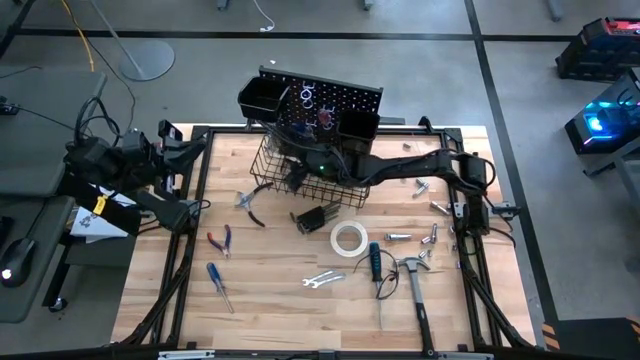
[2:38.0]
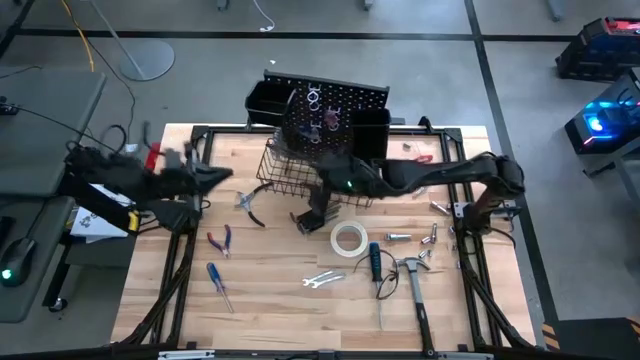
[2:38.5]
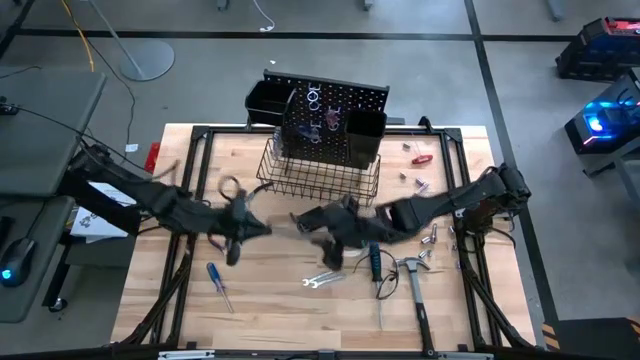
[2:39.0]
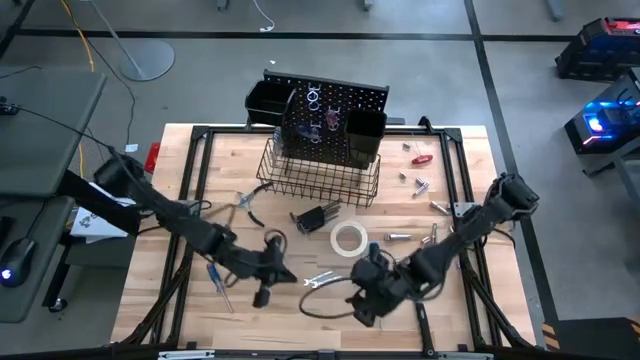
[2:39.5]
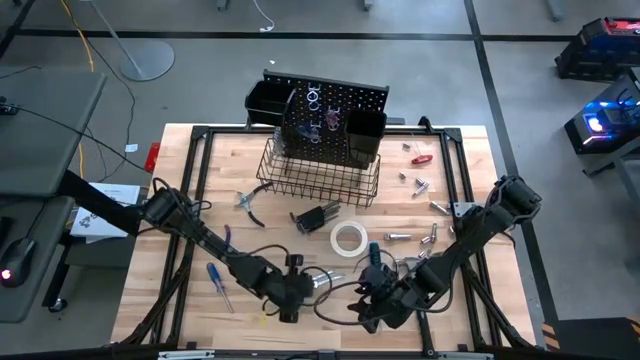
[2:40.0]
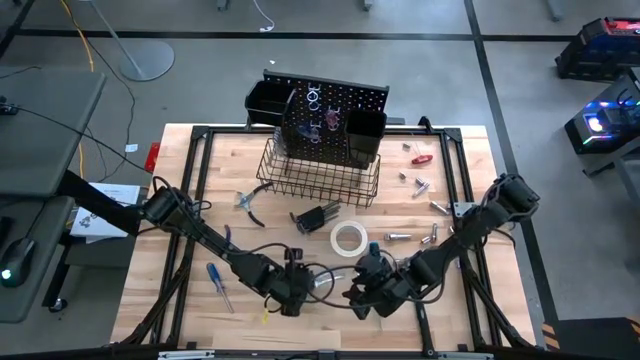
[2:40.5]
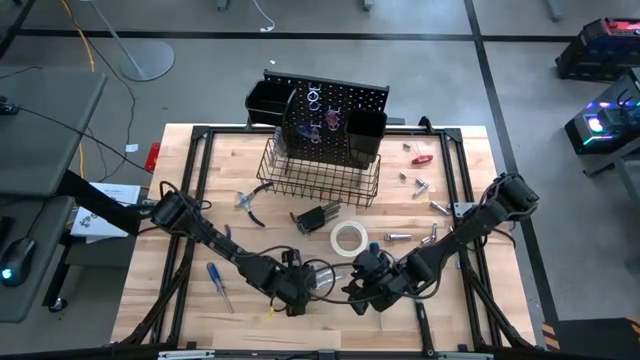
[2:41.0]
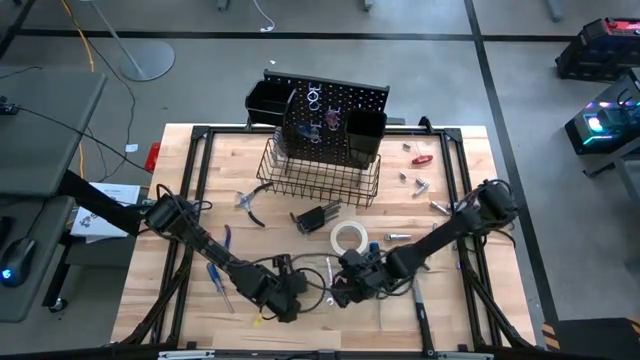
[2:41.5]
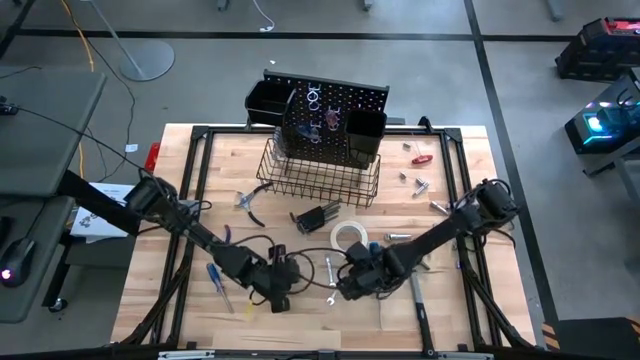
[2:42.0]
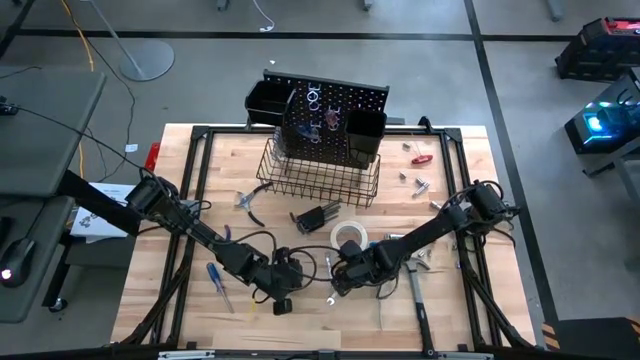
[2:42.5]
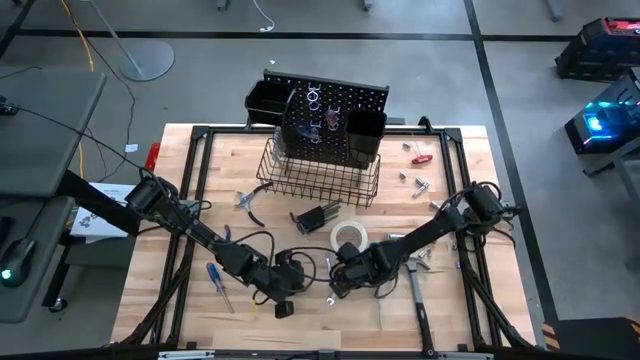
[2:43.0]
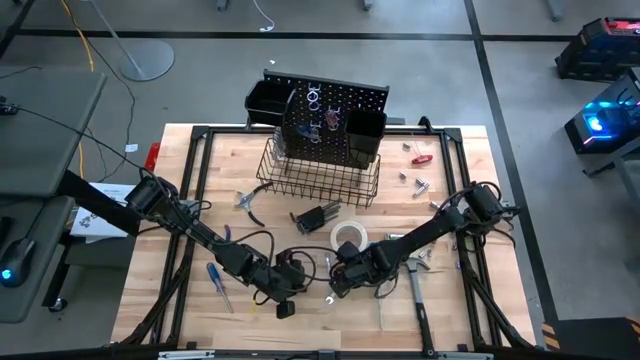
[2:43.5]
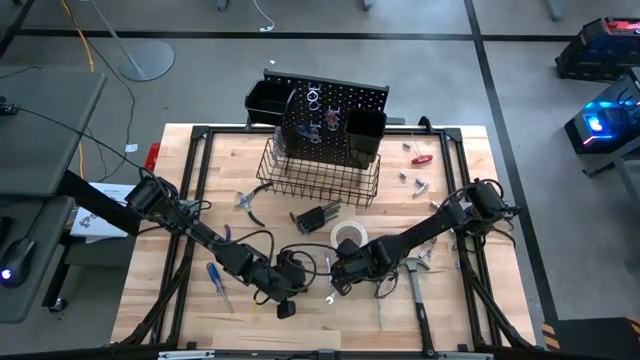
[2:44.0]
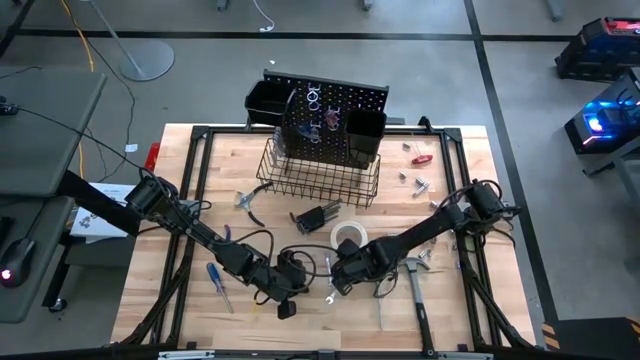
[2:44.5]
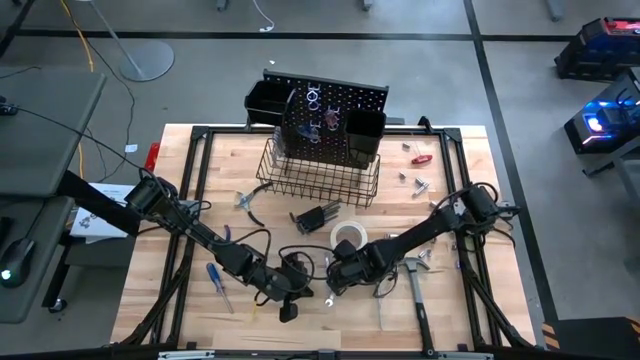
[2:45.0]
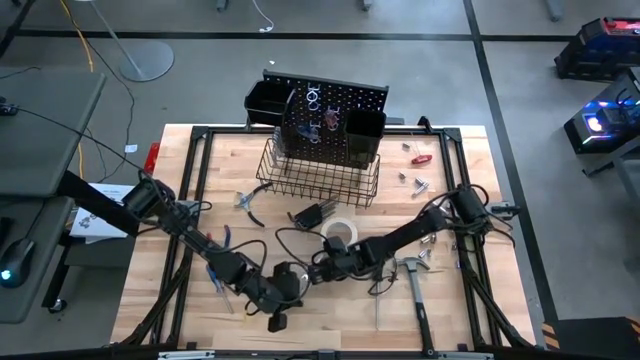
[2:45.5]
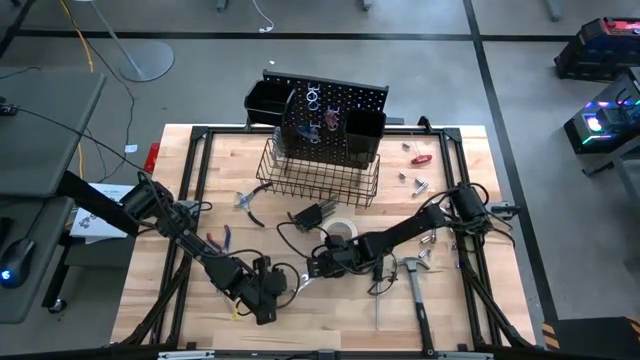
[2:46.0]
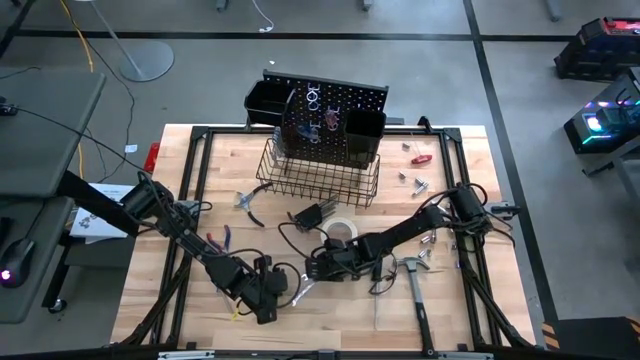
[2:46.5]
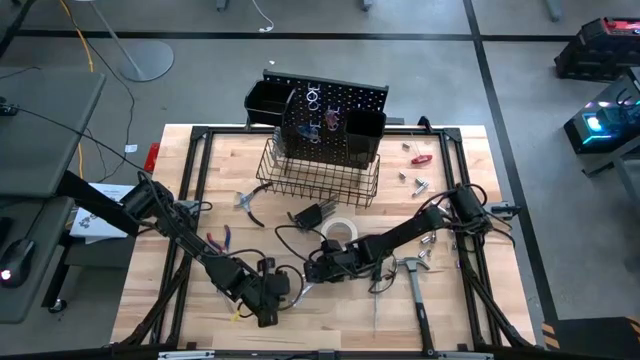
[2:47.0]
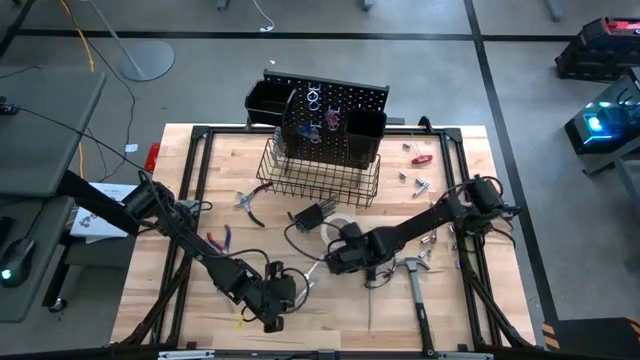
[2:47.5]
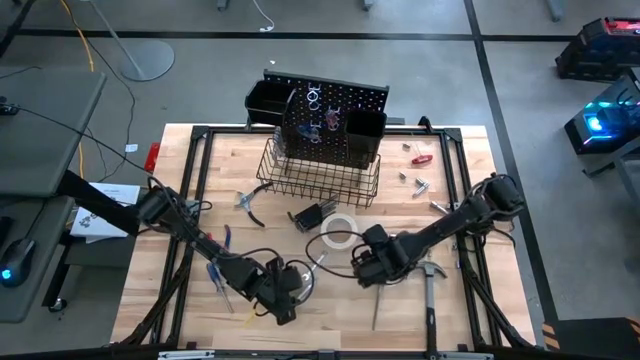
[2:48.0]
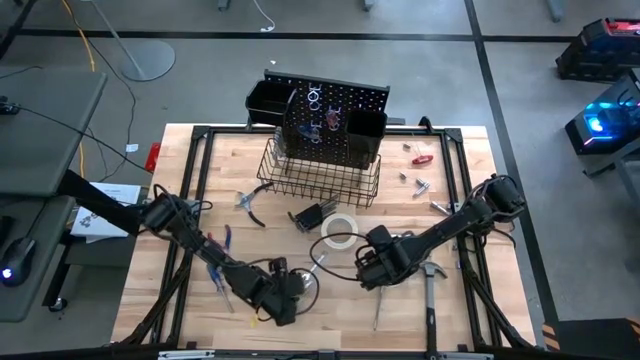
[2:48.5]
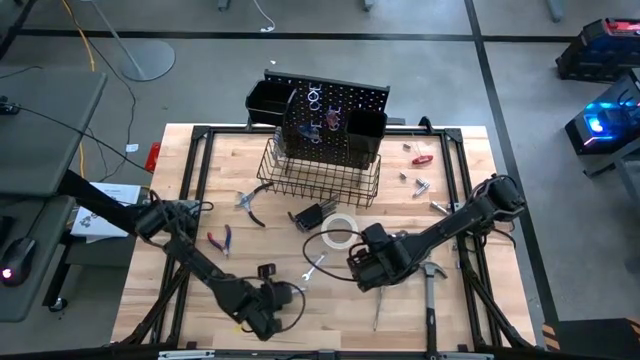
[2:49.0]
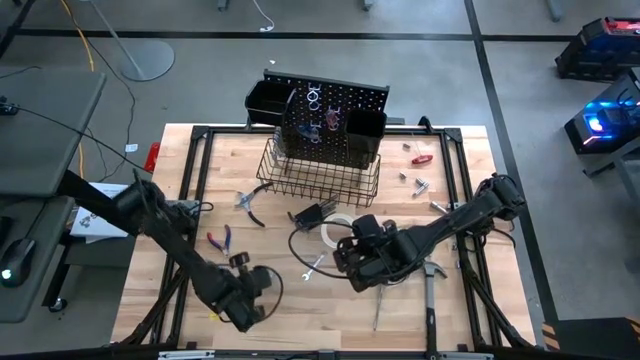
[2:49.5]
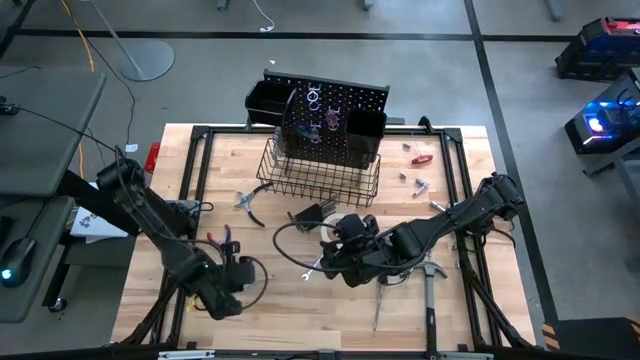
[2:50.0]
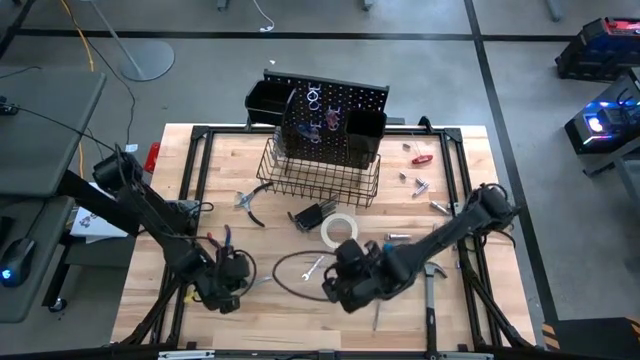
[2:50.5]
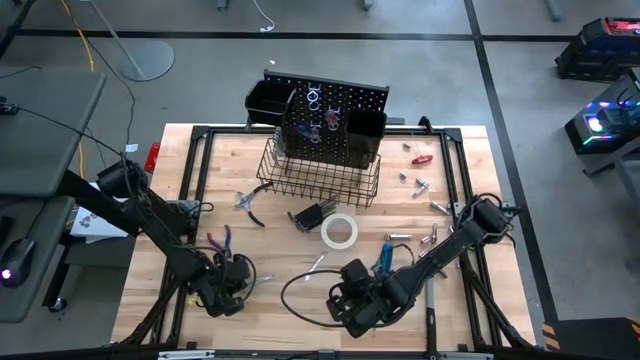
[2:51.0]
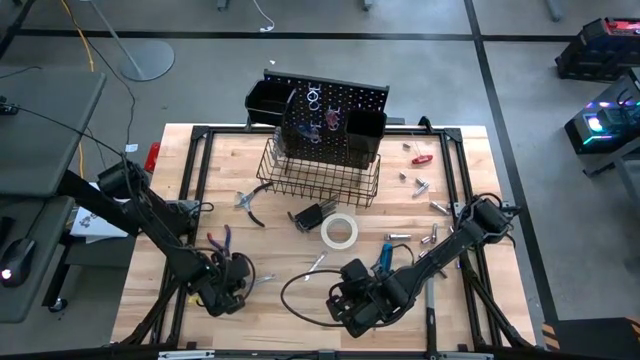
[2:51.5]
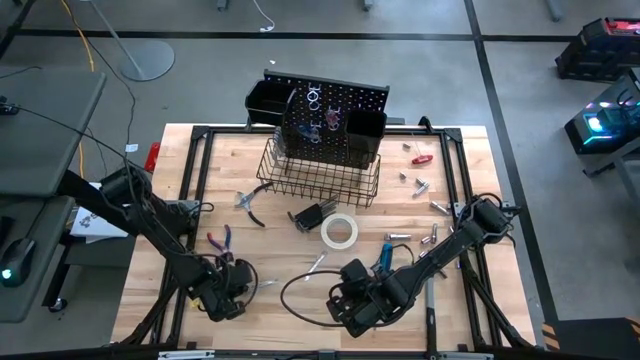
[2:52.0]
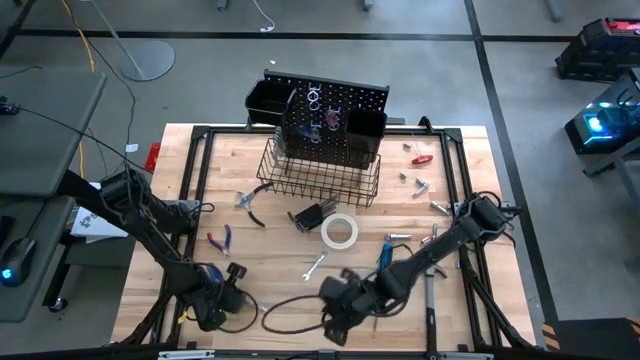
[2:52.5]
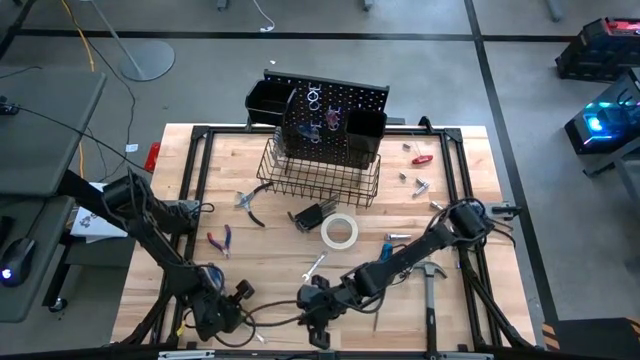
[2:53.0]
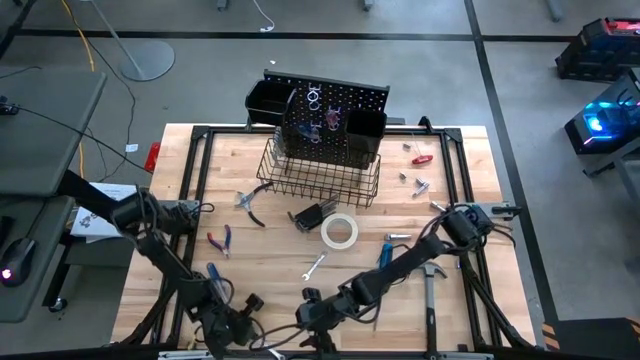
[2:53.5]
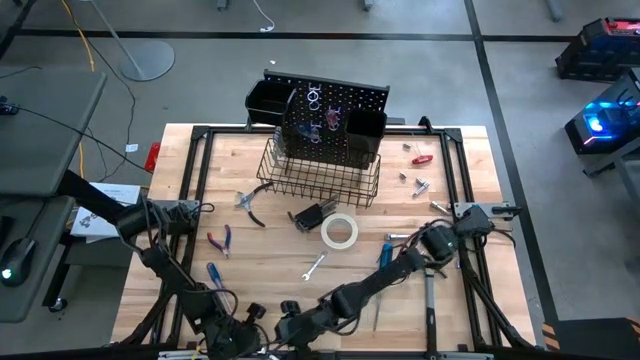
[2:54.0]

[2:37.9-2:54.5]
Task: Hang tools onto peg board
Hang the wrench on the peg board

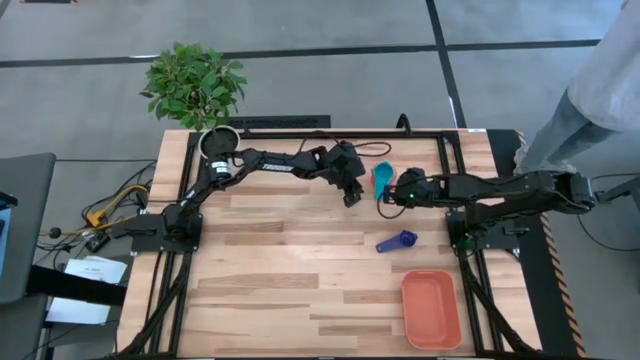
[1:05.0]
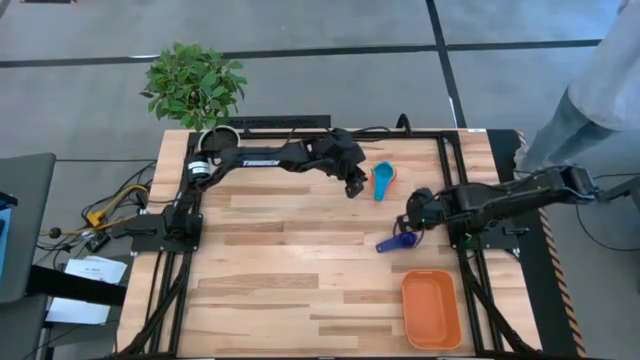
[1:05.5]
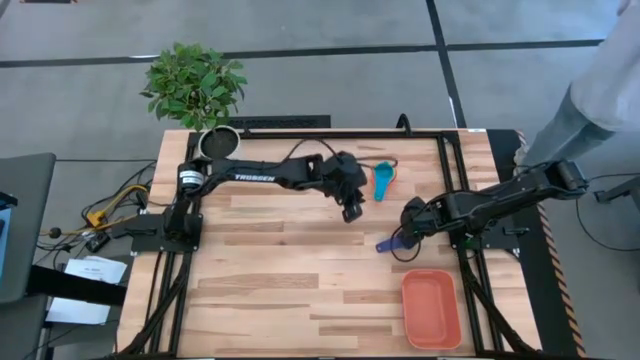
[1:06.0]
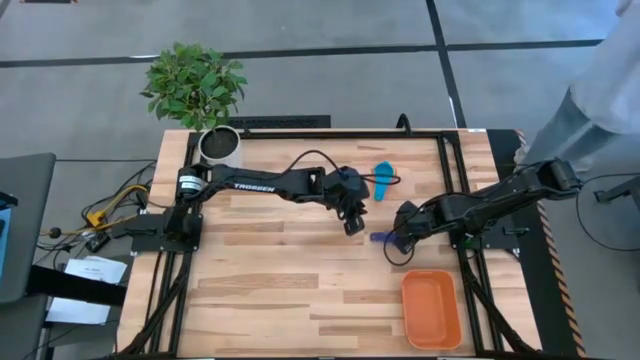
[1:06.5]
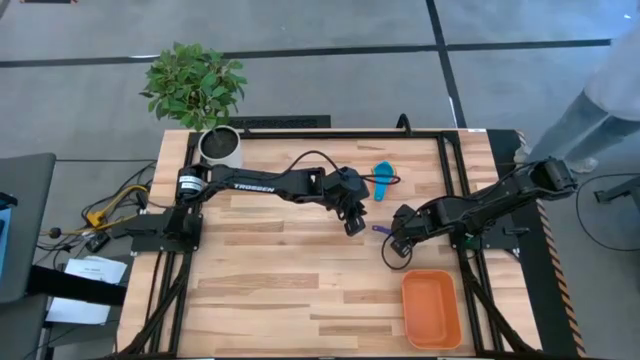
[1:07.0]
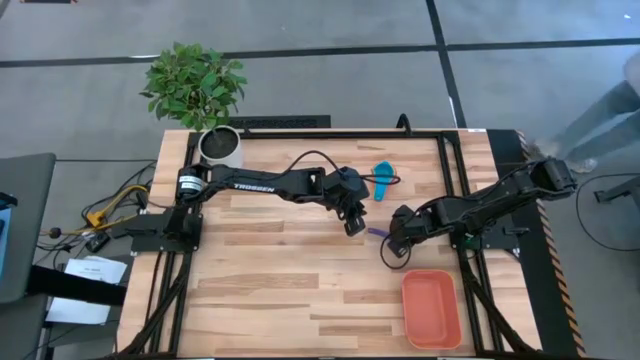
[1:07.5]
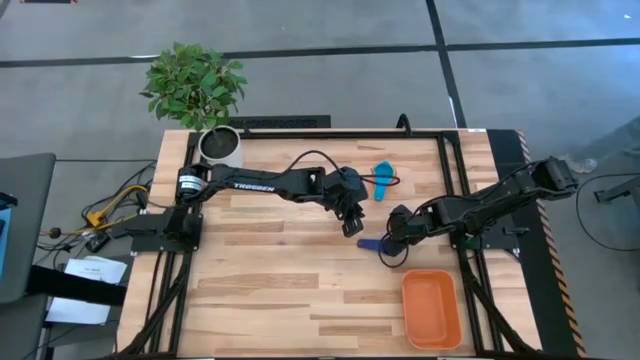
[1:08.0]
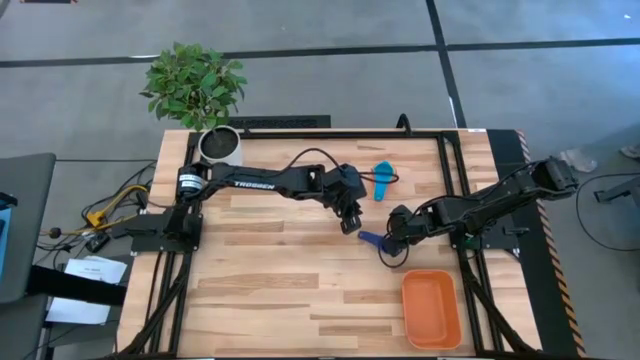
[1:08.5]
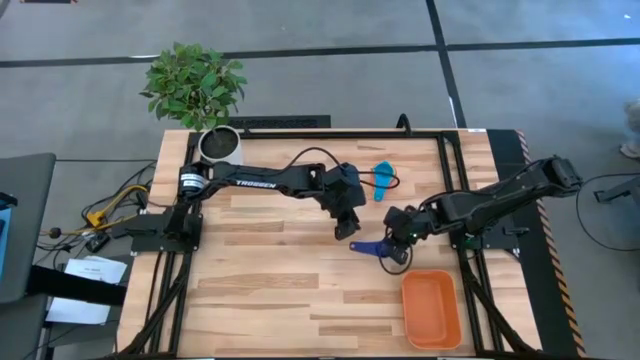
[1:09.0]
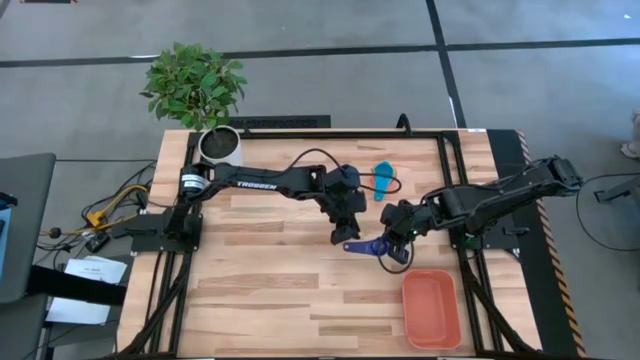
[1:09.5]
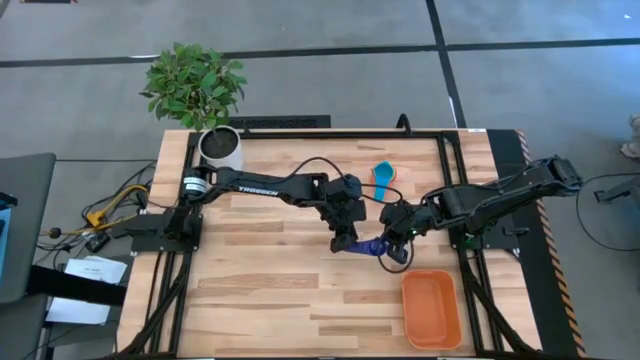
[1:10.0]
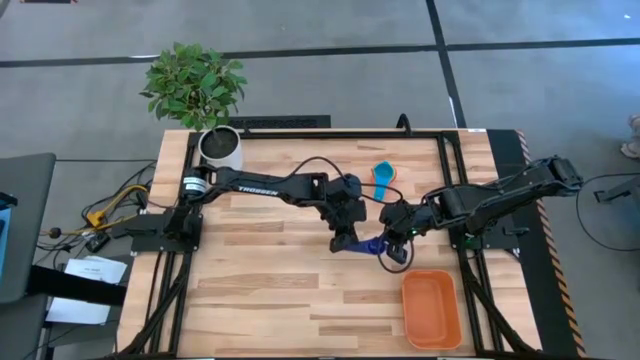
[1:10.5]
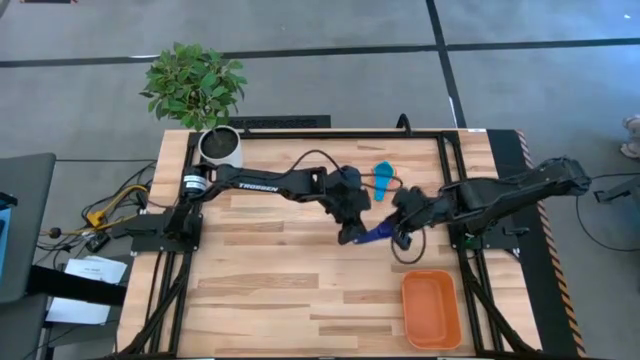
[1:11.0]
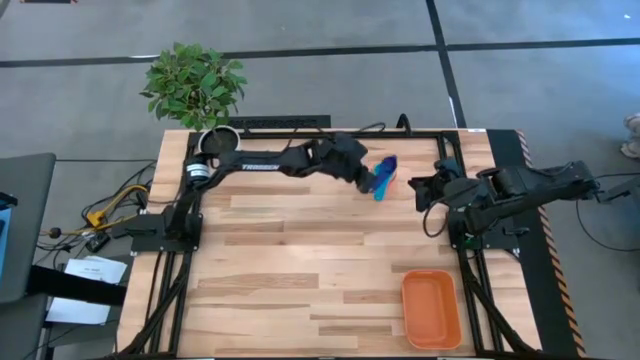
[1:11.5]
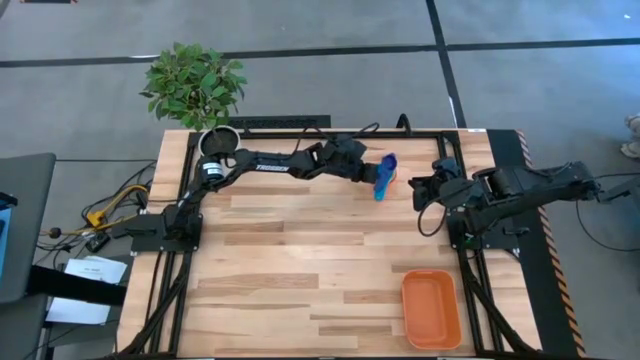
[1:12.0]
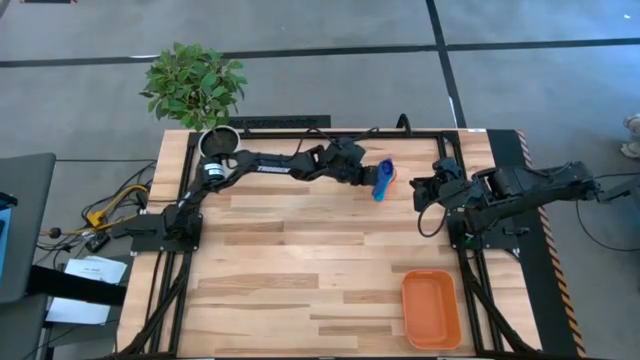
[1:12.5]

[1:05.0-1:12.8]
Task: Nest measuring cups in basket
Stack the blue measuring cup on top of the light blue measuring cup
